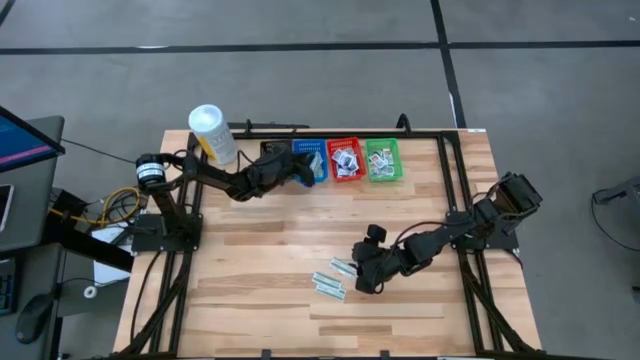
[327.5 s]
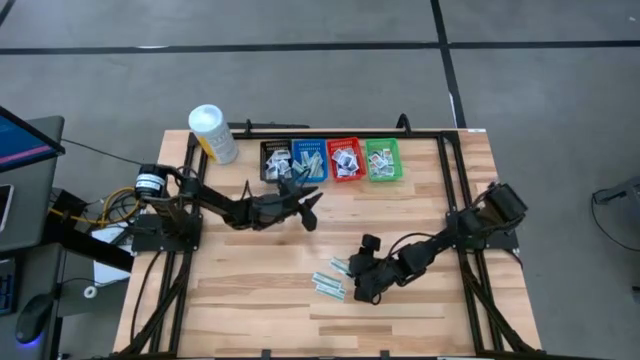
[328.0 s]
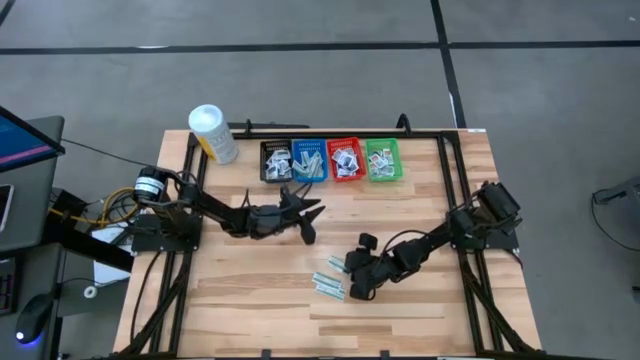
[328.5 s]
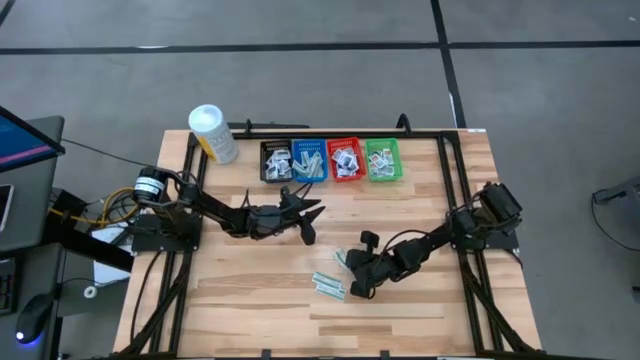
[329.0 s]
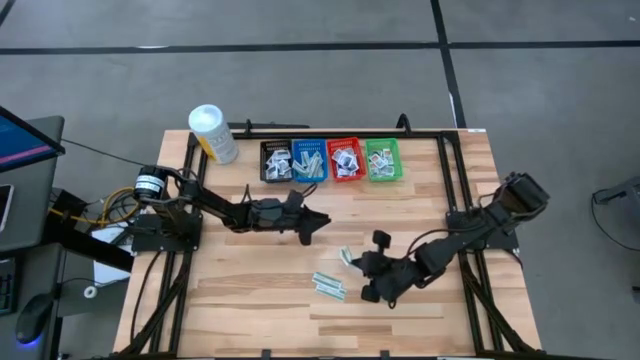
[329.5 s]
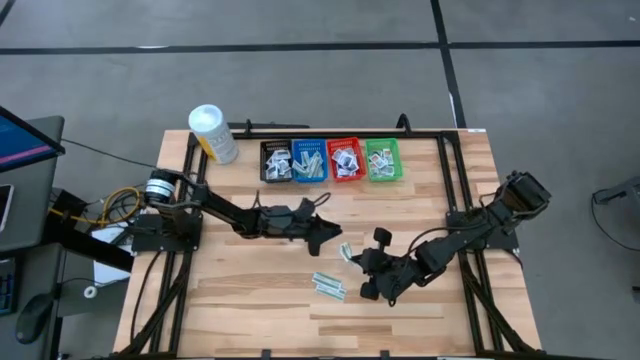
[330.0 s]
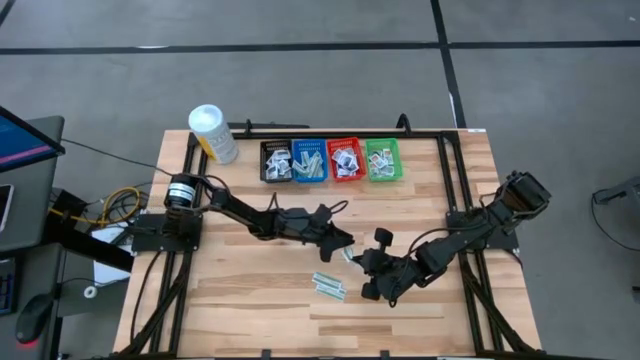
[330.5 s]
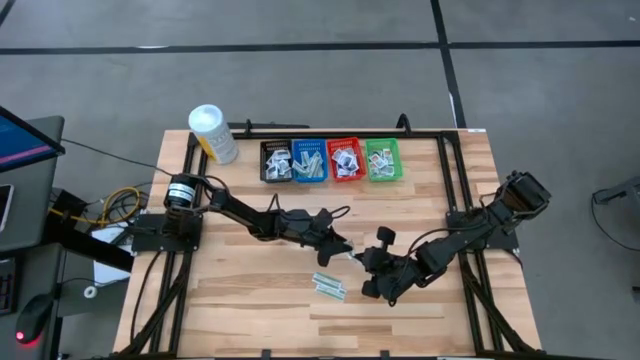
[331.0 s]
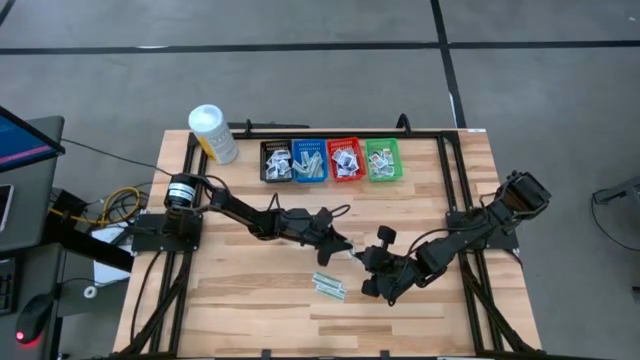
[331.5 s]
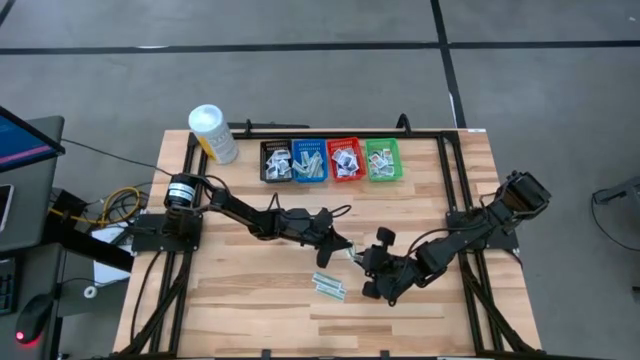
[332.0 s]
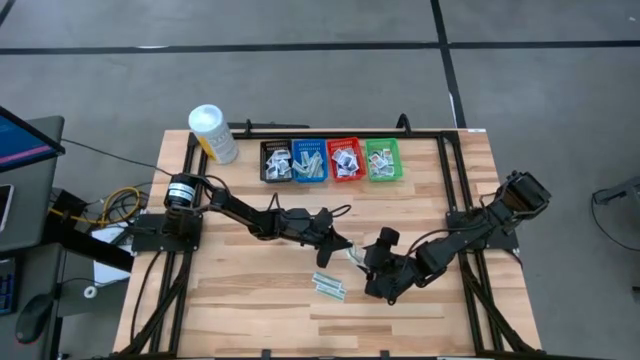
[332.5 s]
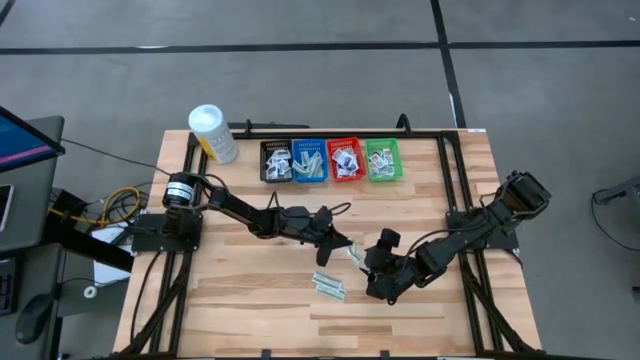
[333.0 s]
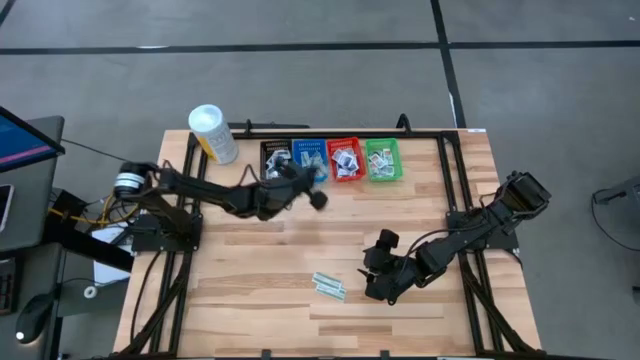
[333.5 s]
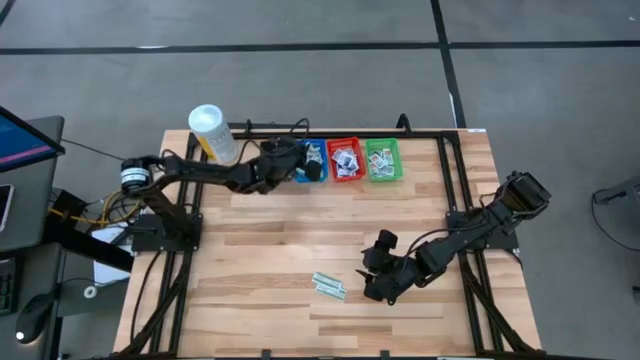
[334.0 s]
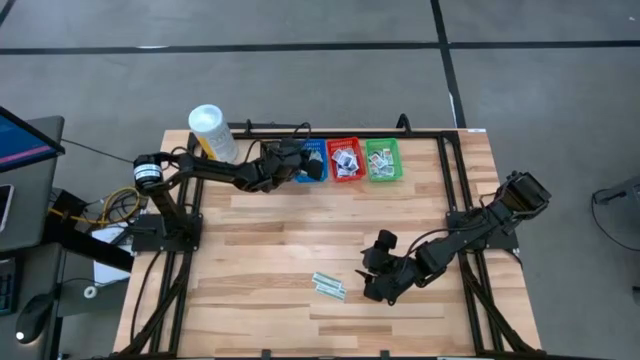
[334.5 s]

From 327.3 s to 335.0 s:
Task: Pick & Place First Aid Supplies
Put the green pad into the blue bin

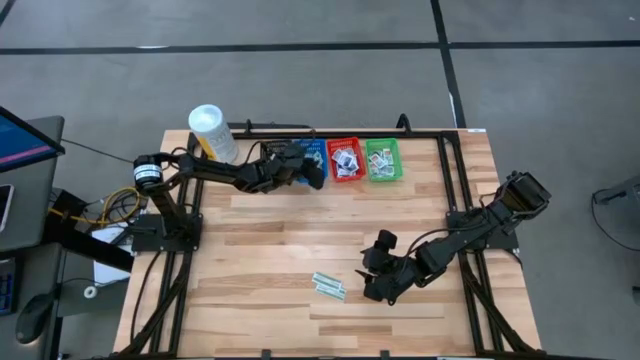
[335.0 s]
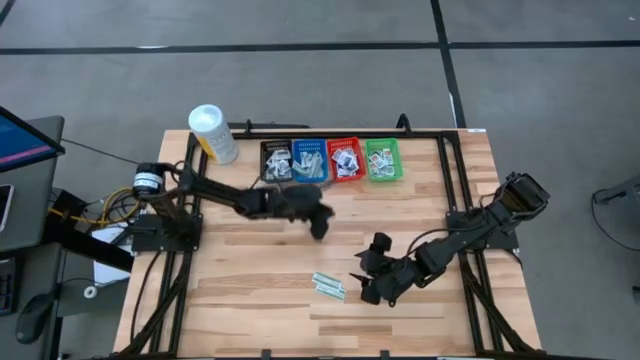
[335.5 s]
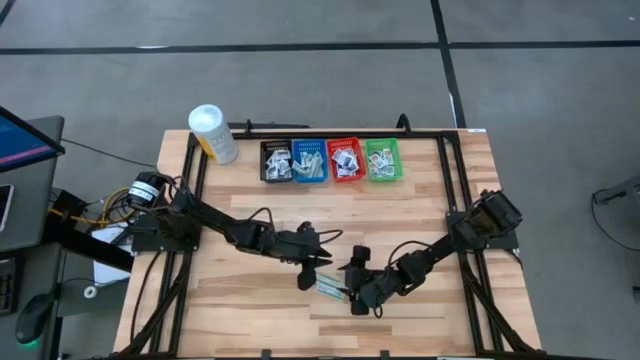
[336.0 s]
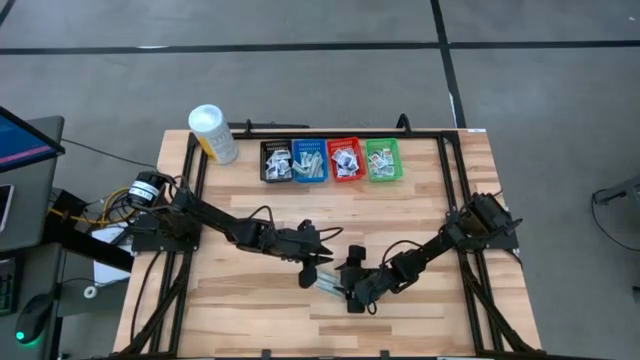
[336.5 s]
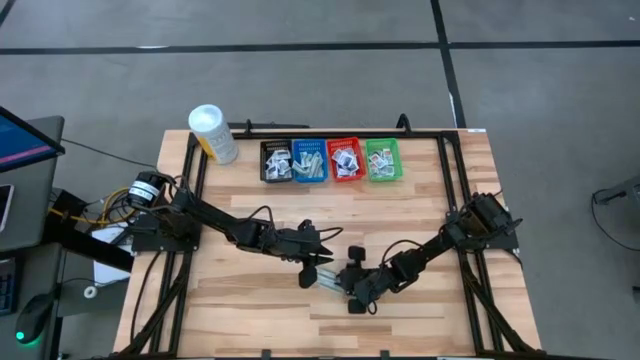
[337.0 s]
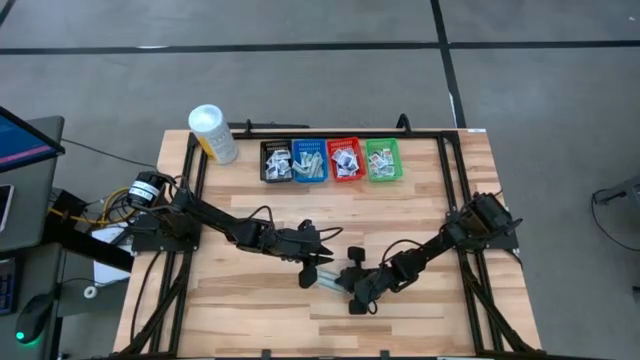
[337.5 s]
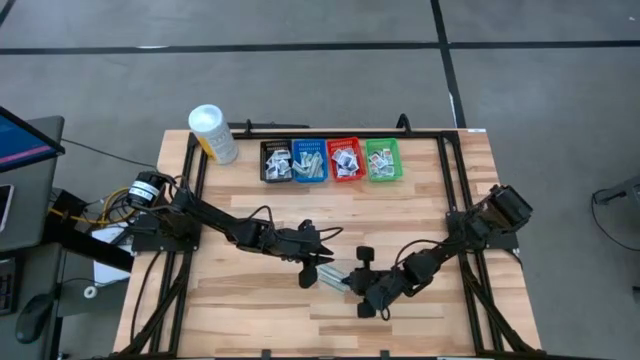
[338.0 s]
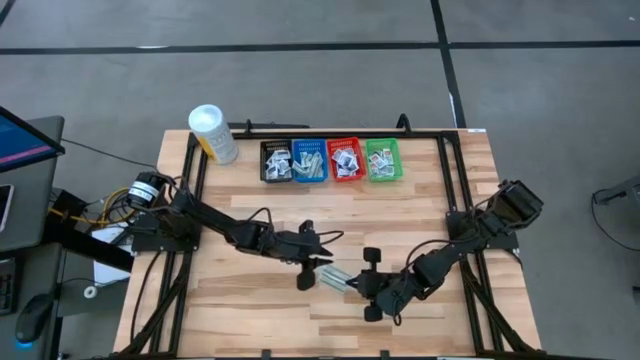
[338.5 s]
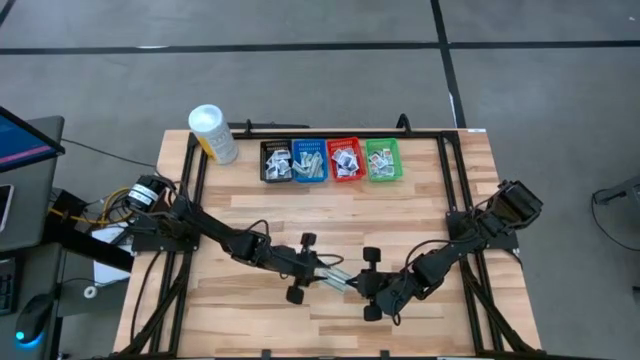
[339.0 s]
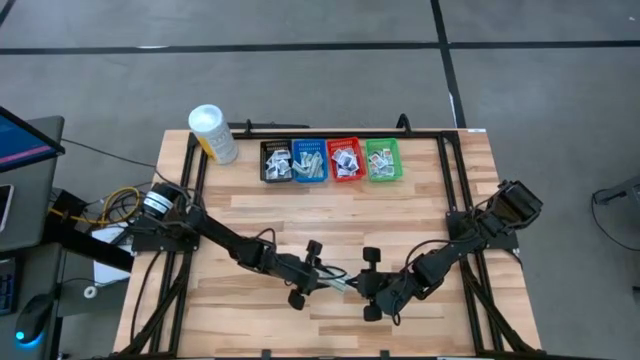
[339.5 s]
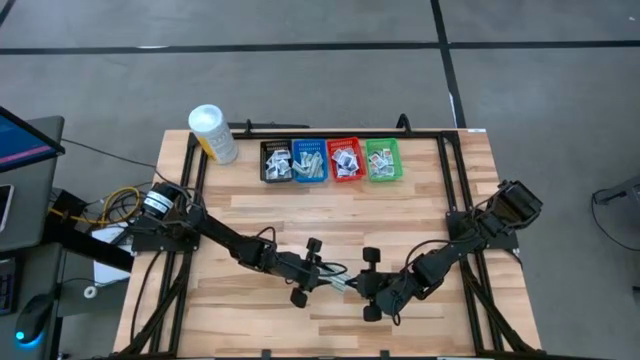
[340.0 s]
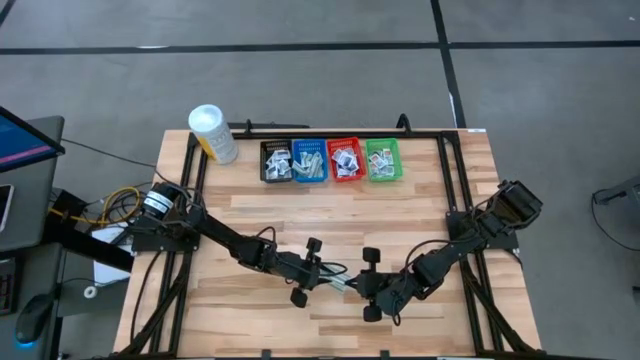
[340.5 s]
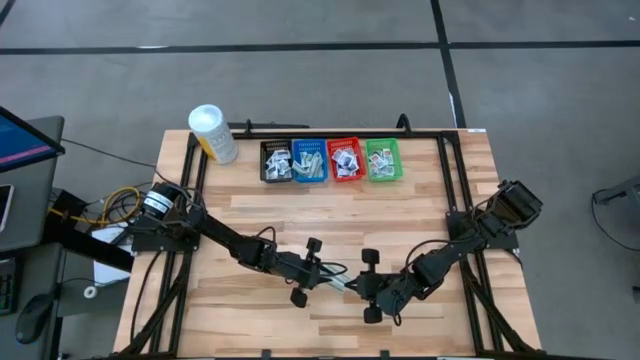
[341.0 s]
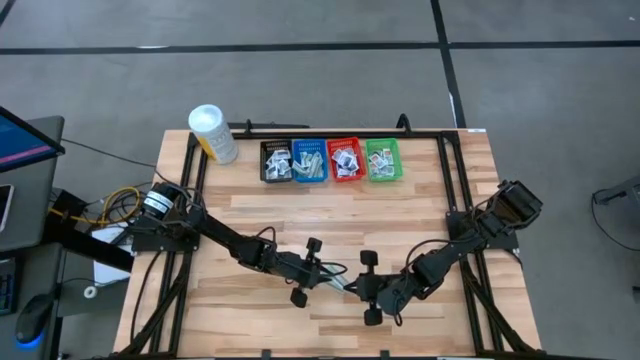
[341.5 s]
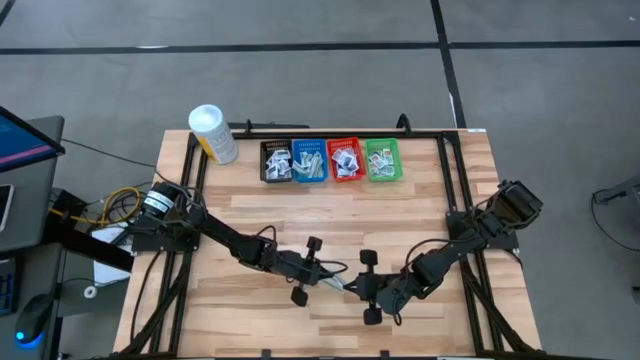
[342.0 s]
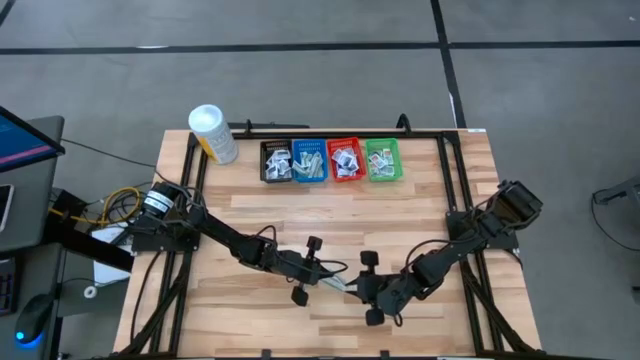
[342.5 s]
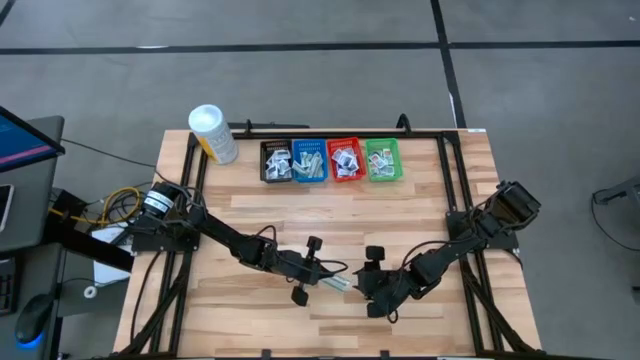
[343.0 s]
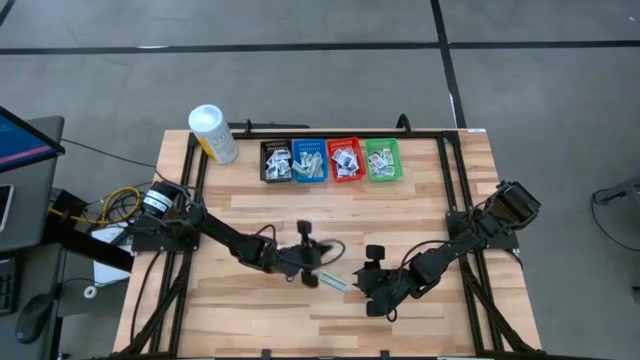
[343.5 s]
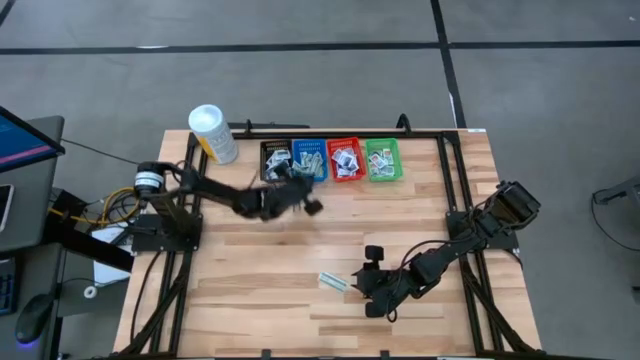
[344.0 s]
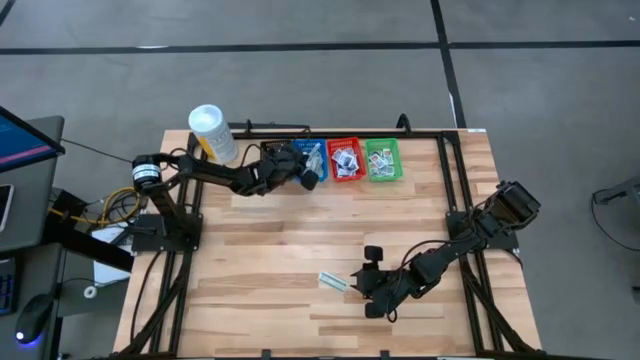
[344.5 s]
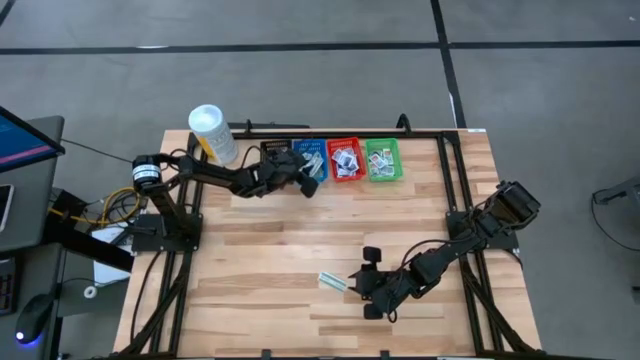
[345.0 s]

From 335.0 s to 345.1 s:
Put the green pad into the blue bin
